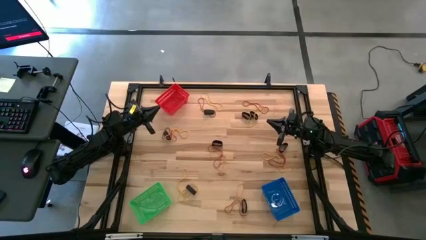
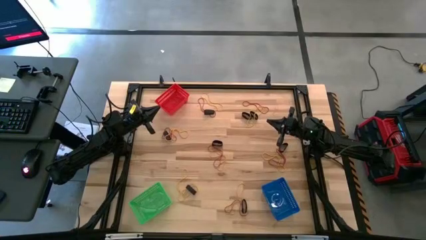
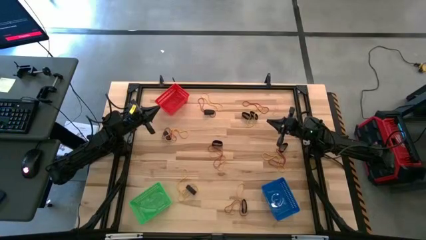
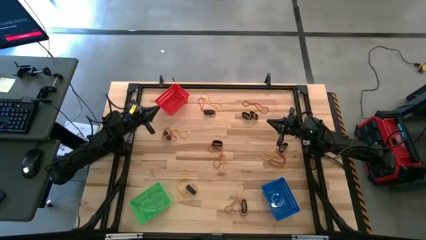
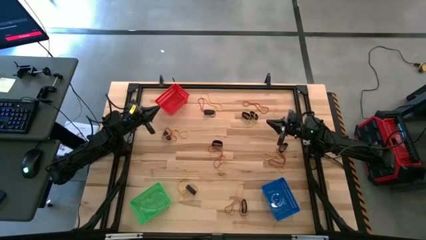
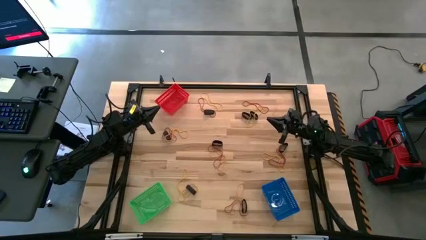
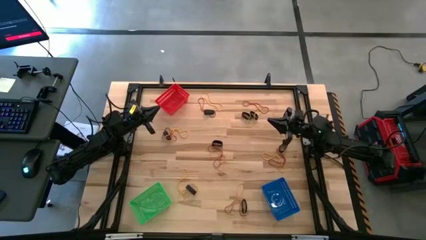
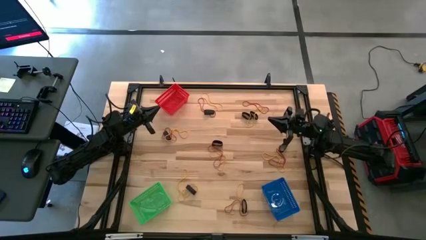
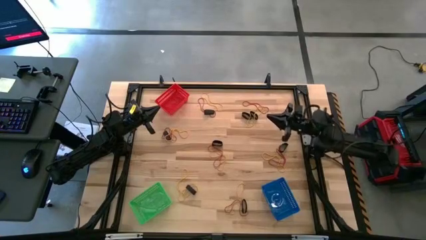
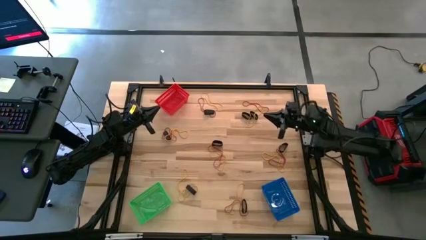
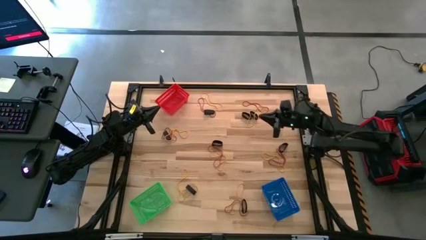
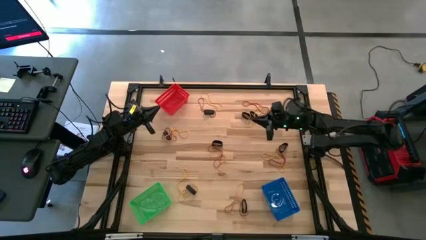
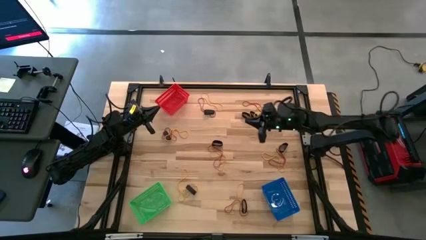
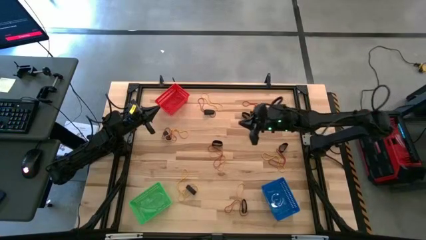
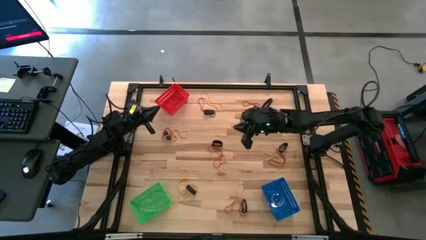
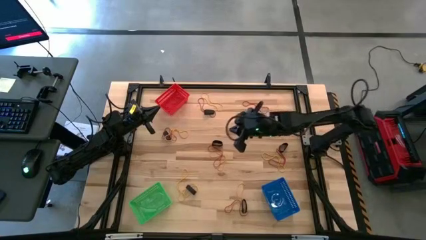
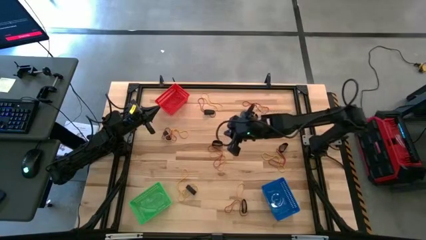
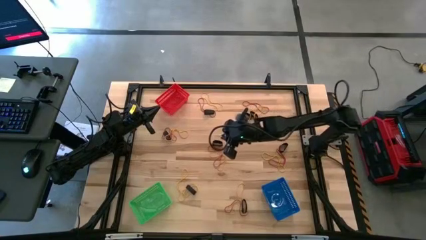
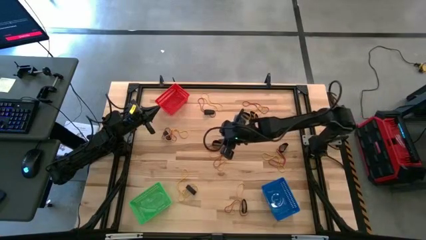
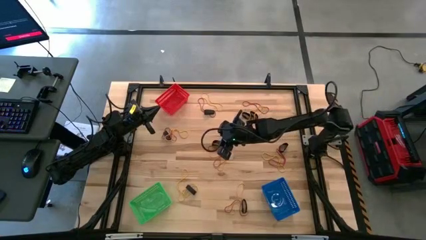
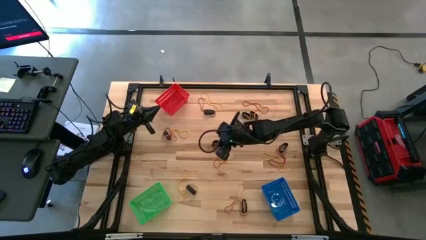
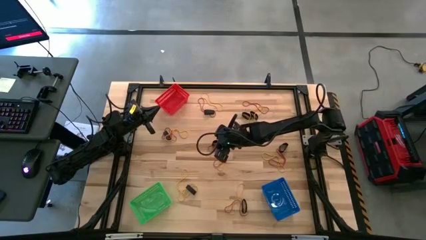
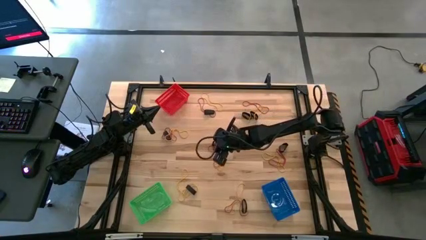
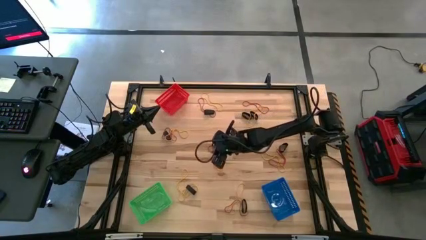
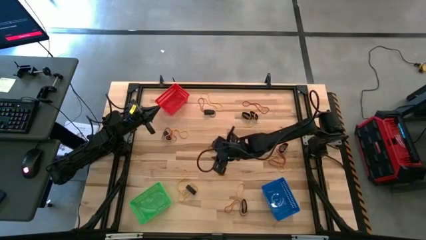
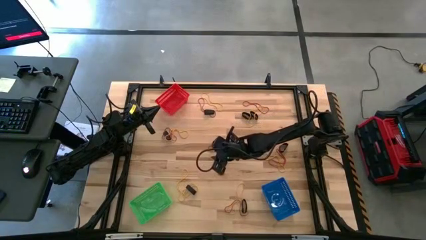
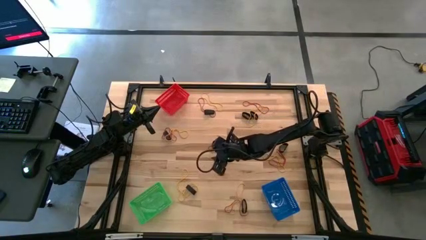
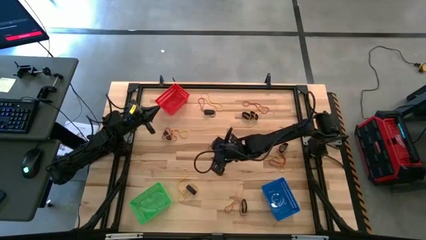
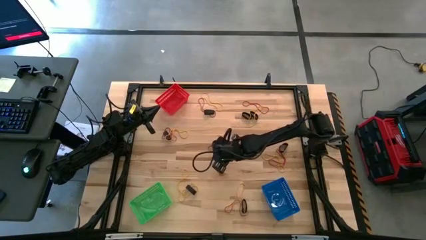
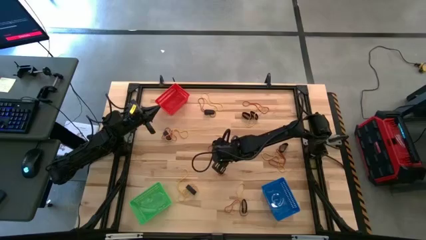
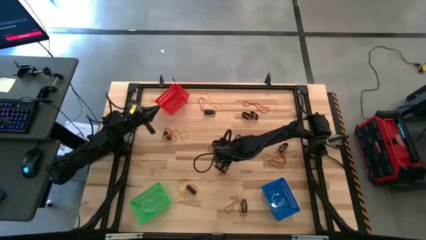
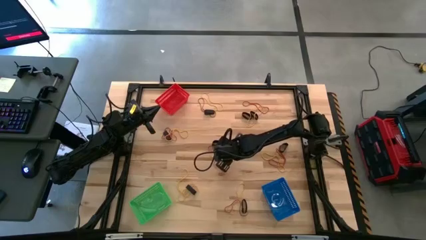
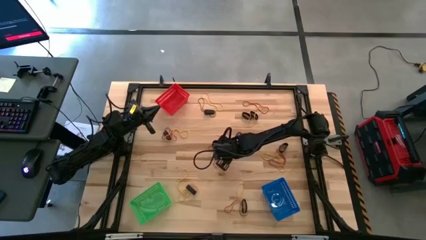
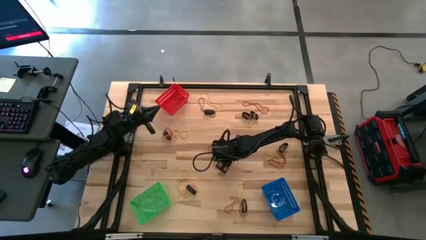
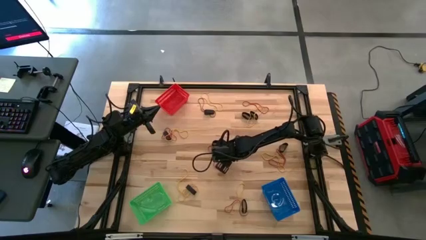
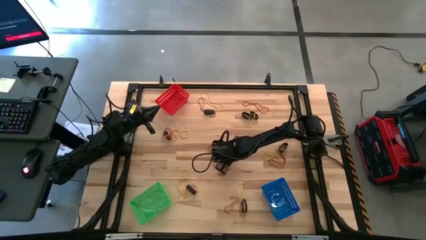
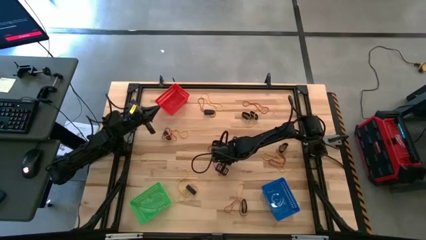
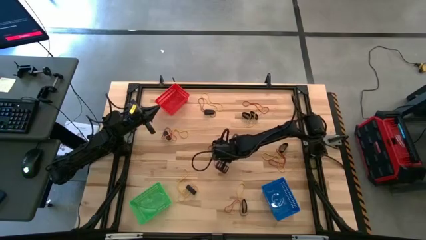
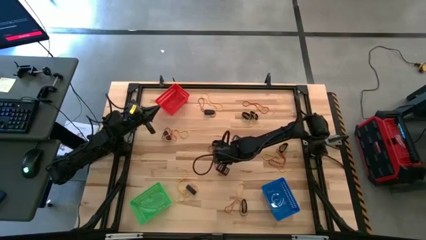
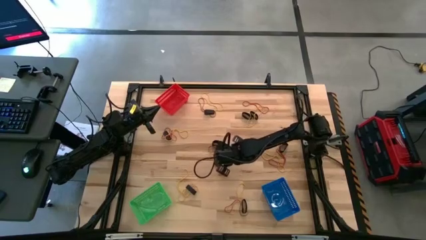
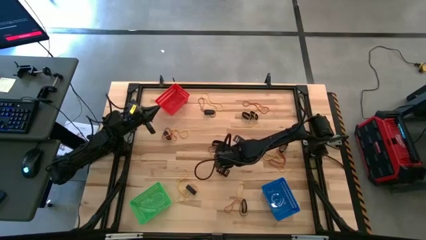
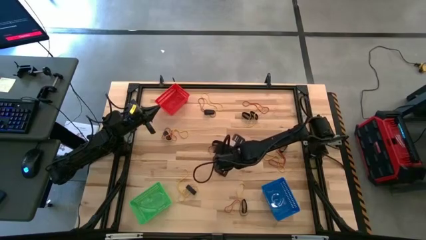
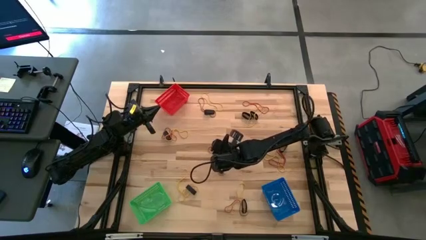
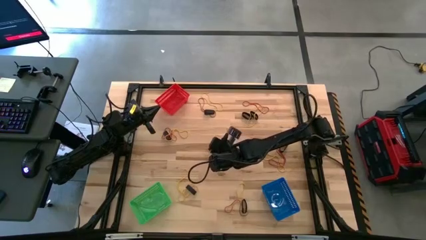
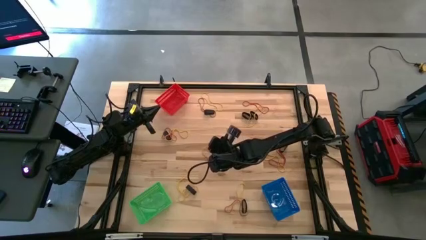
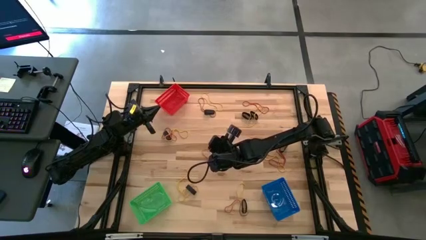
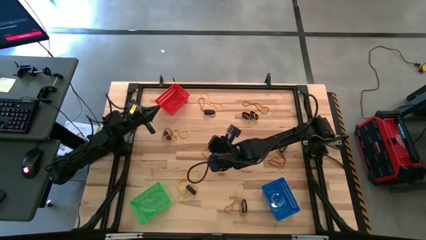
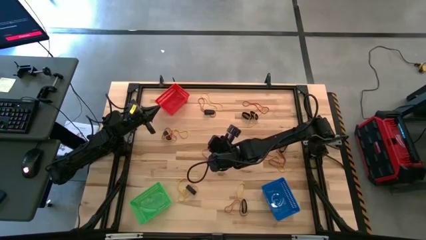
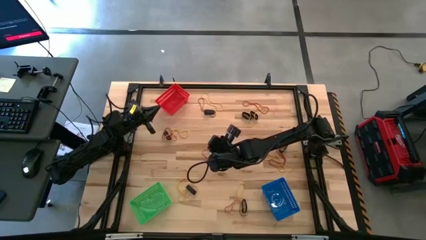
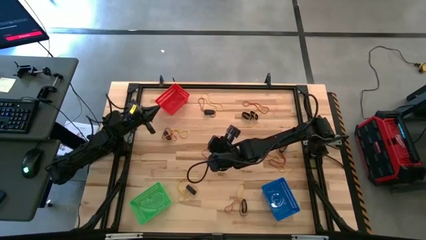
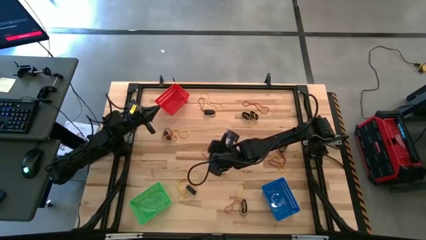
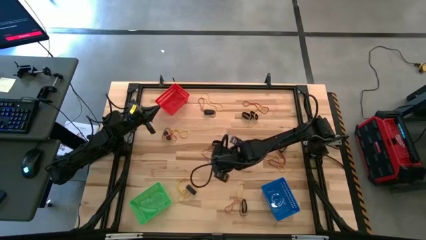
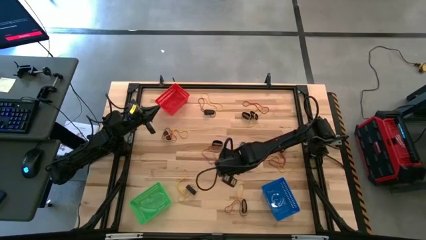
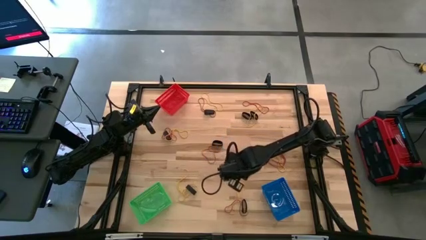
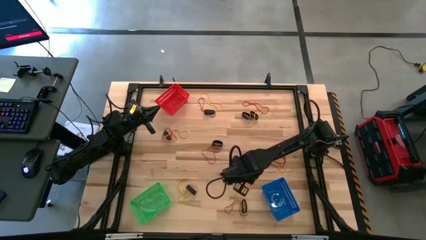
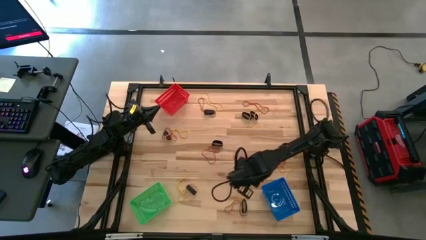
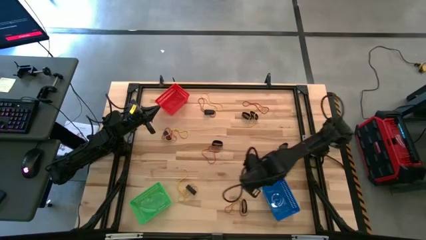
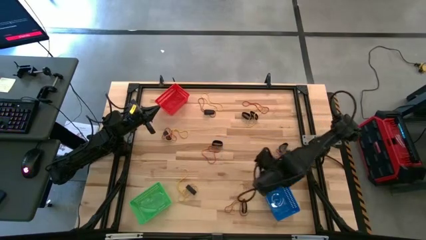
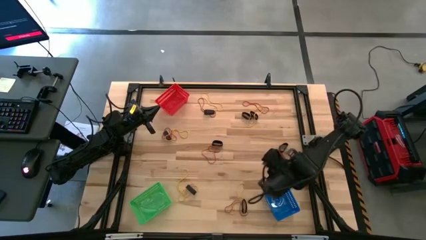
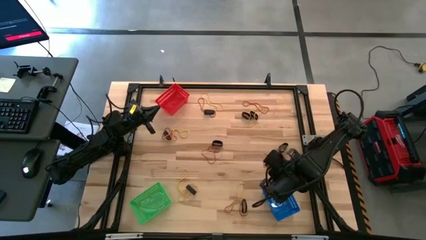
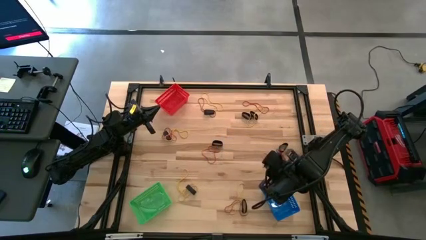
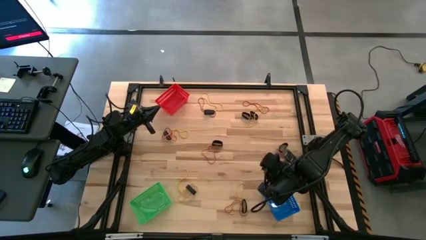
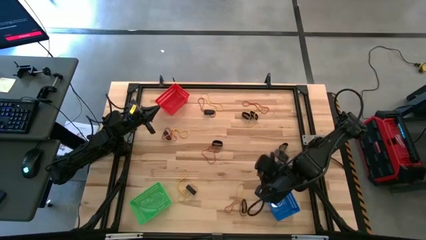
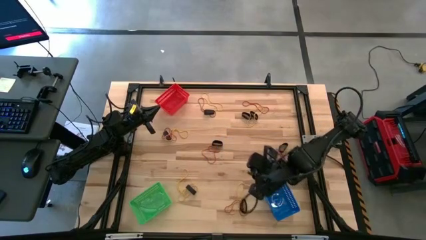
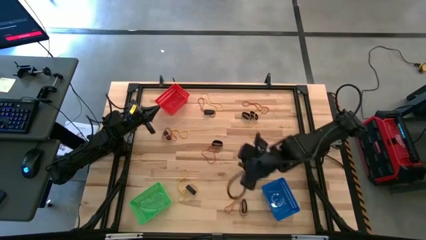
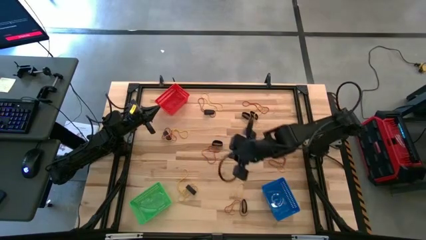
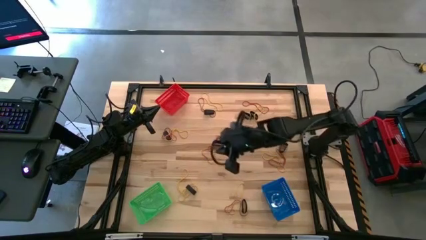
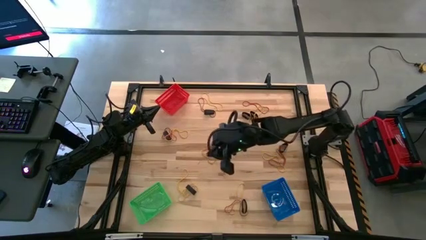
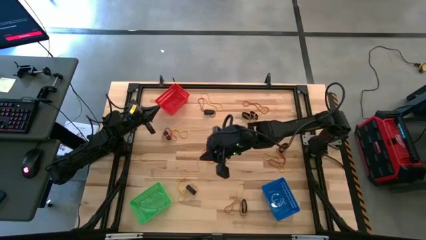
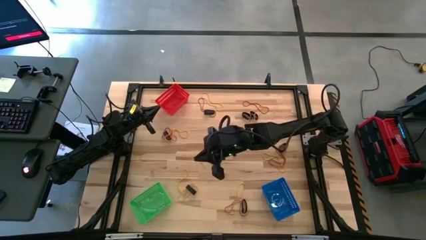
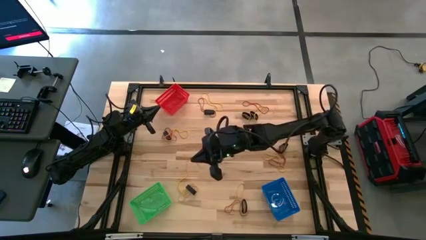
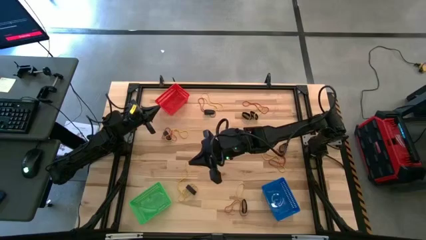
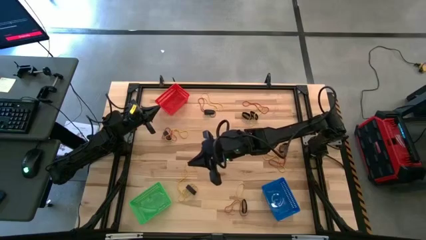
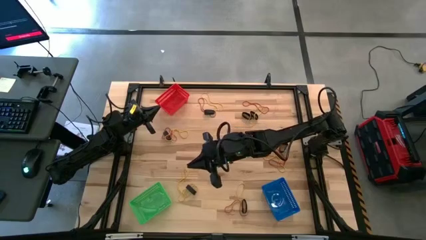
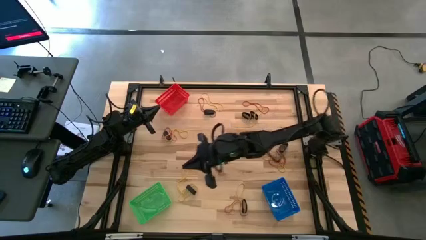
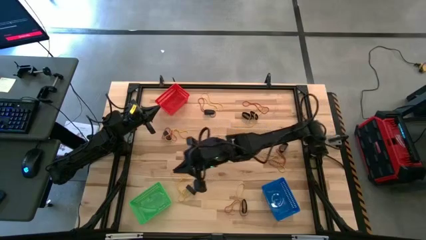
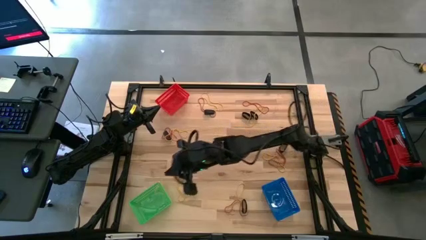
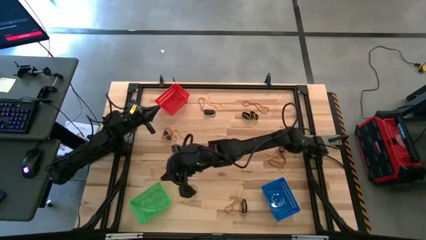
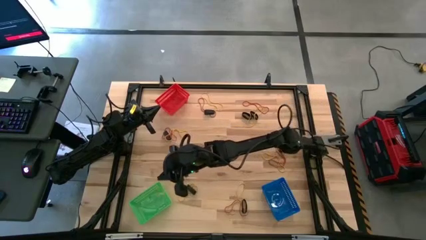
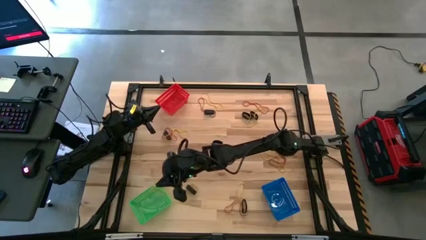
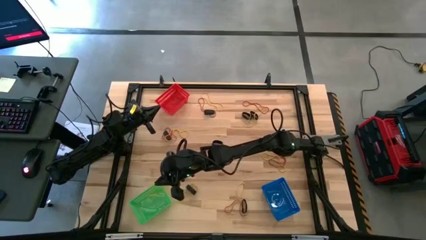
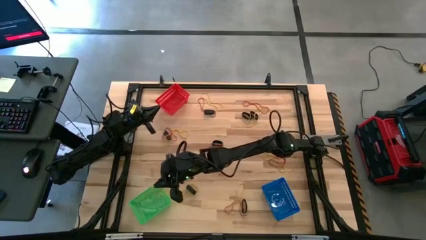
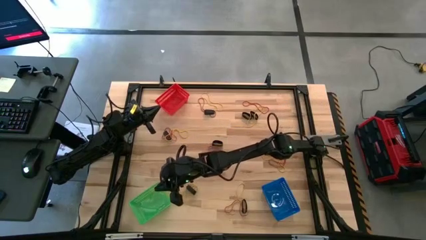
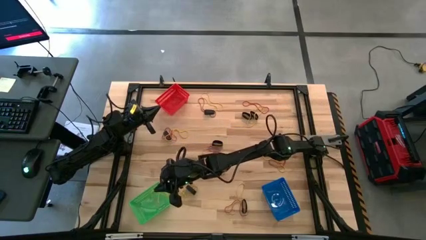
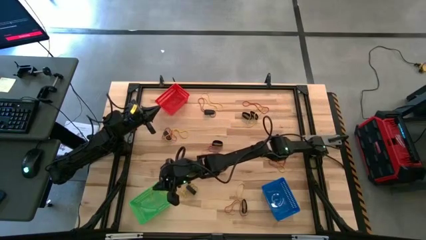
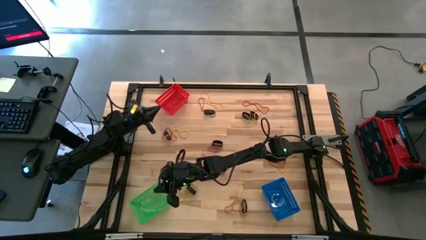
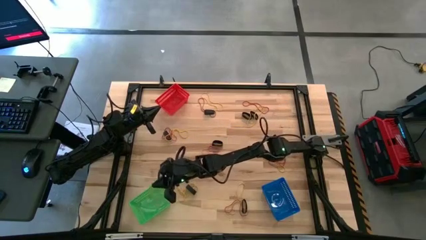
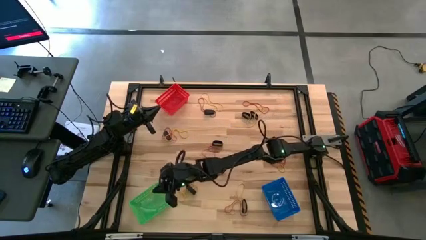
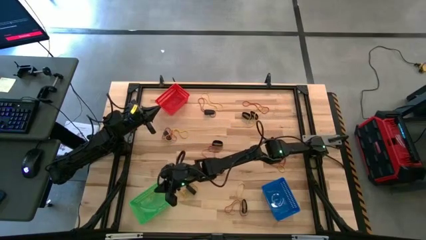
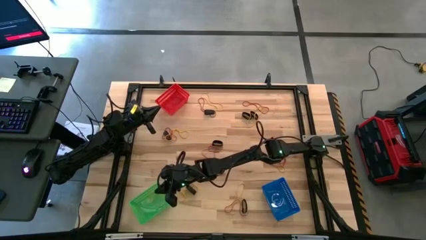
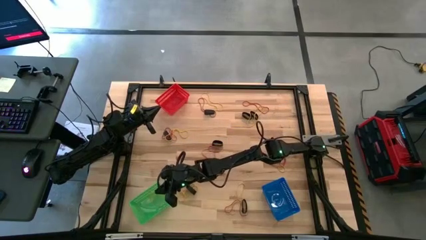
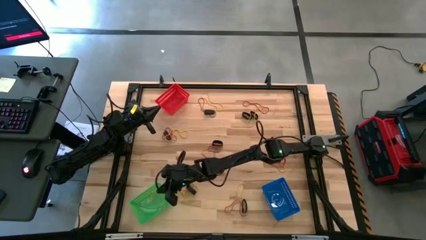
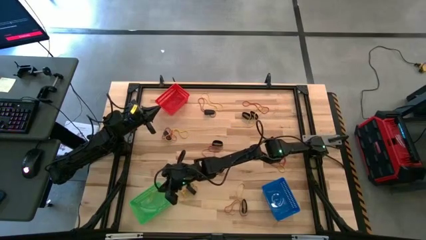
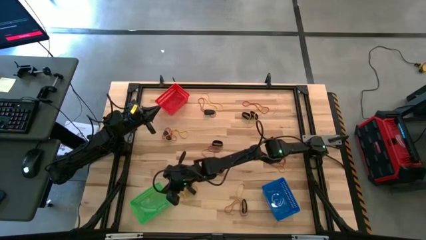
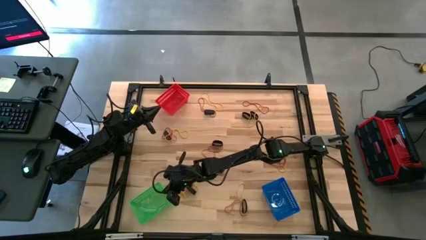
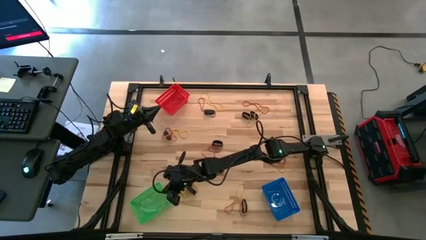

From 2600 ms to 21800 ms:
Task: Sort rubber bands into baskets
Put the yellow rubber band into the green basket
